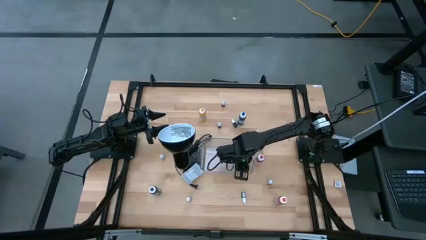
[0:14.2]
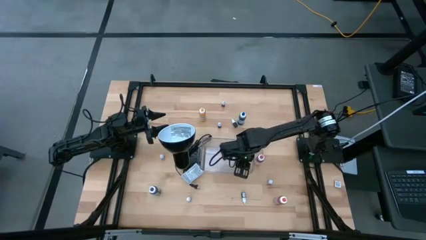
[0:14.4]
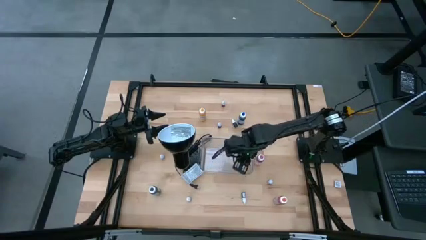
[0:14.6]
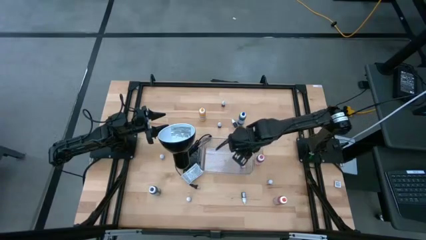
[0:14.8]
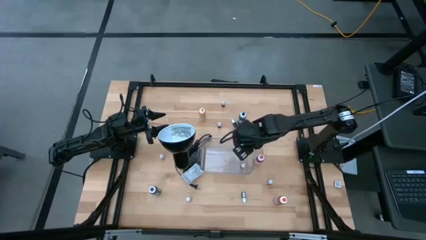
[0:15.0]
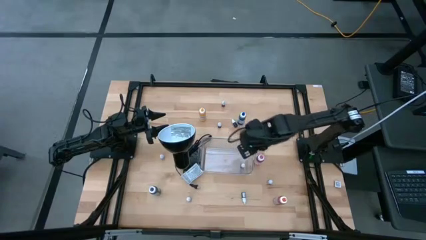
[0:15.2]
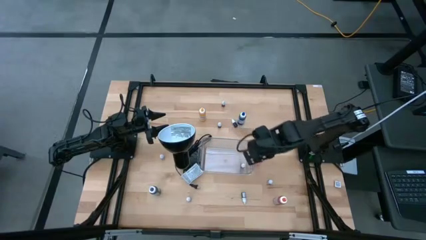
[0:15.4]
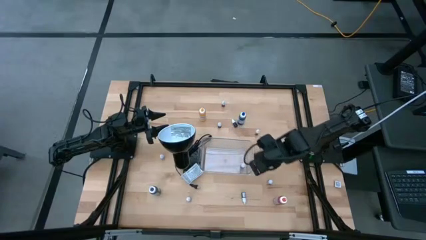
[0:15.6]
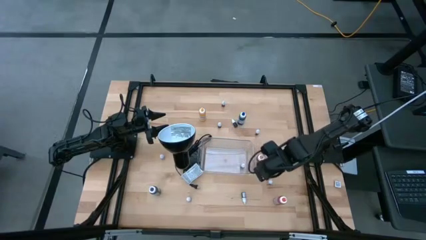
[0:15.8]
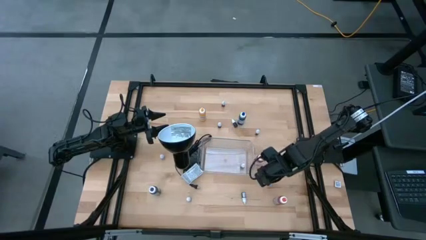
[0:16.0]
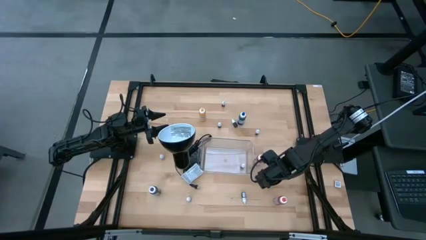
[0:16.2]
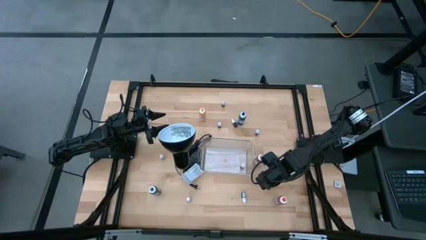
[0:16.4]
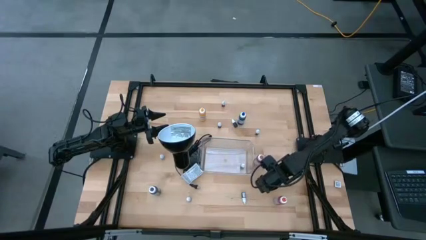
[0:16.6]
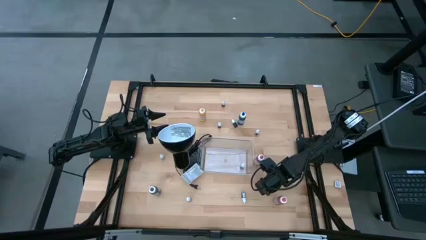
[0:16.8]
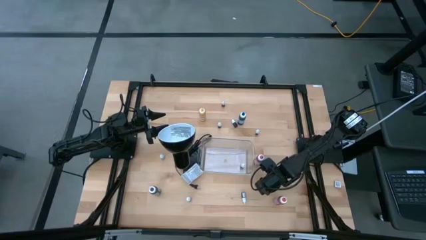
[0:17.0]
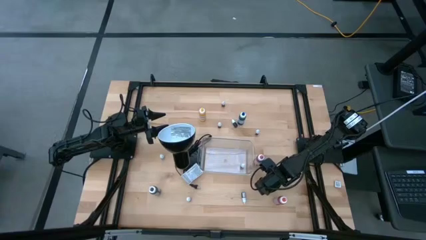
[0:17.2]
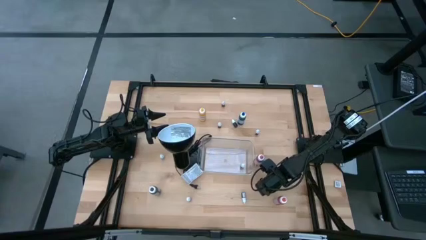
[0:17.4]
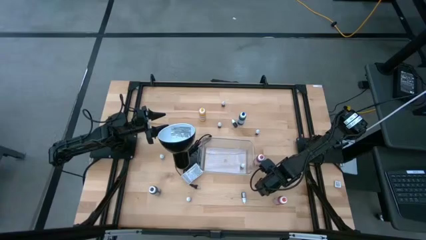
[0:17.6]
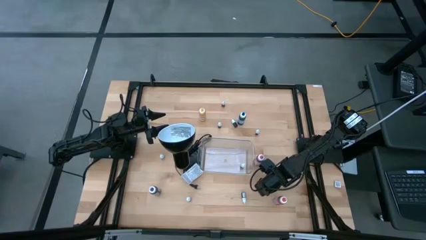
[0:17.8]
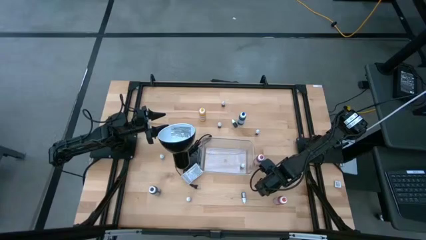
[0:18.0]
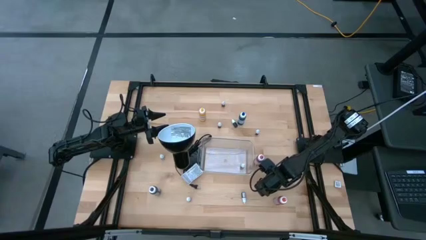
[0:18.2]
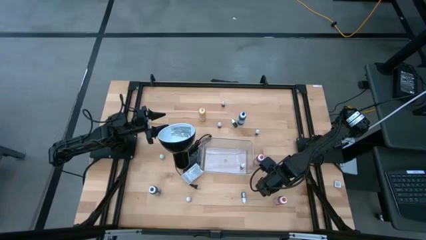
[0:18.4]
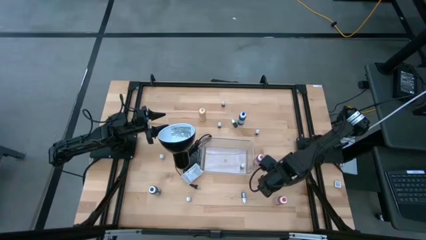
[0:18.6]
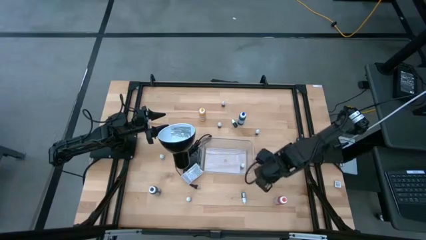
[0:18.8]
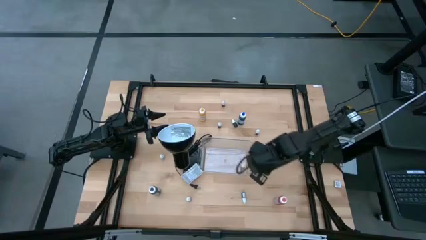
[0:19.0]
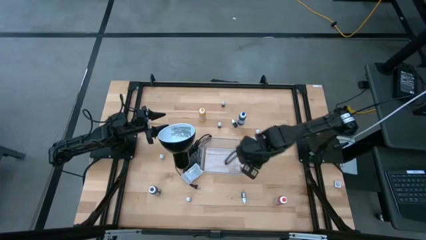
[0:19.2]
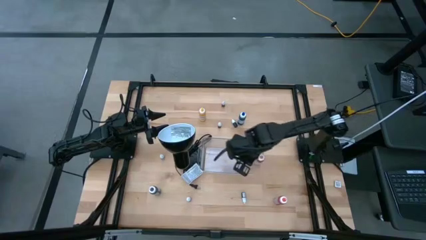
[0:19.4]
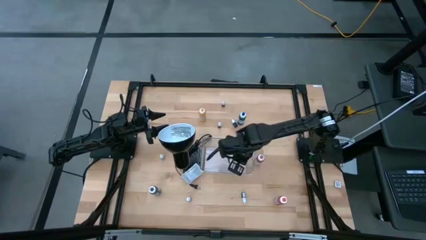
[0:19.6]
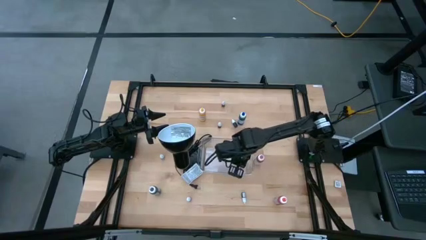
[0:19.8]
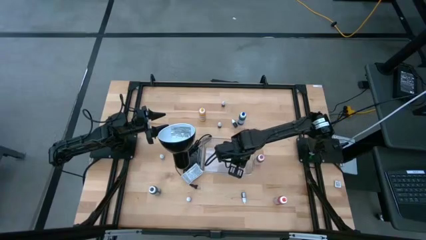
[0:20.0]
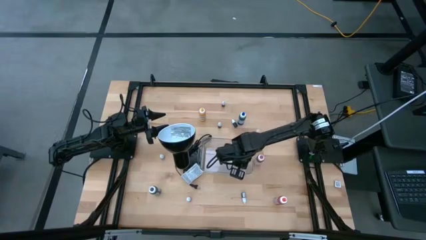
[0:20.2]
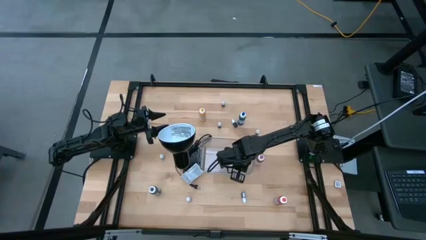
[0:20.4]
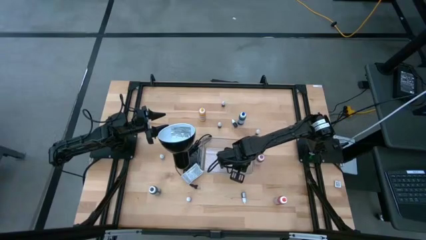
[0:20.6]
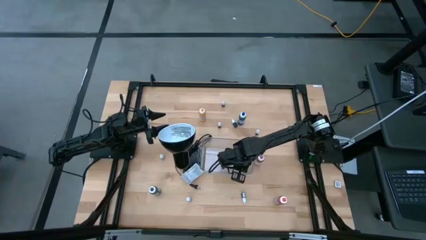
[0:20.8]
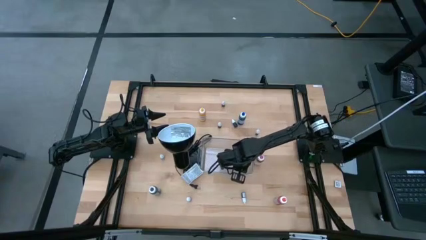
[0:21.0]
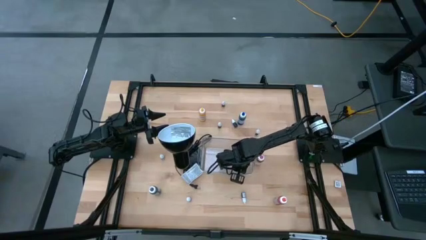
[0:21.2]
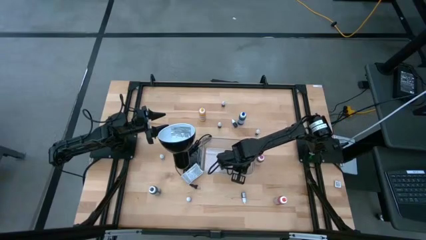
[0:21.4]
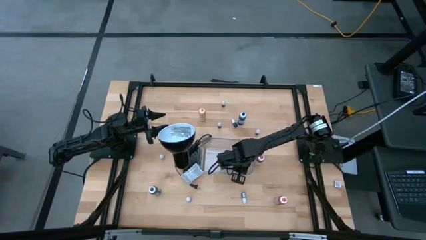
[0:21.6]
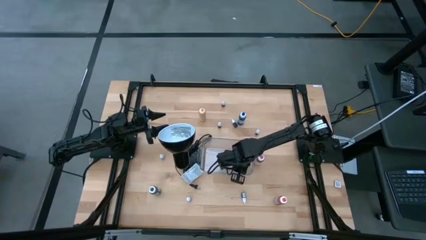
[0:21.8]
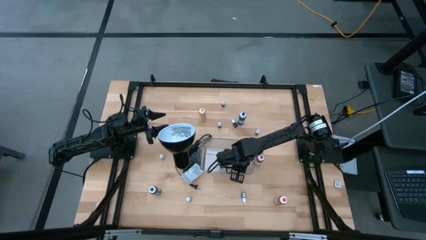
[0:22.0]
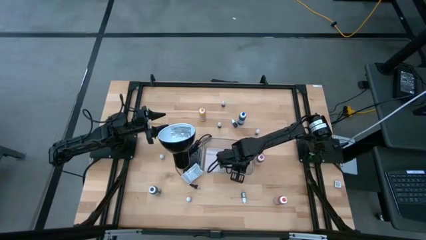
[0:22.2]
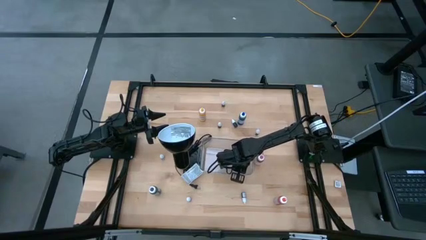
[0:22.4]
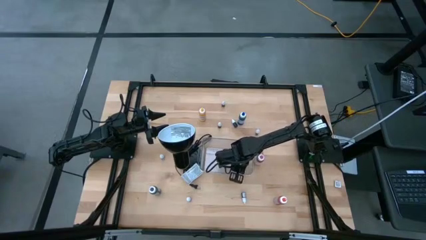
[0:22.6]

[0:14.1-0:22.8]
Task: Pick & Place food coloring
Put the small light blue food coloring bottle into the transparent bin

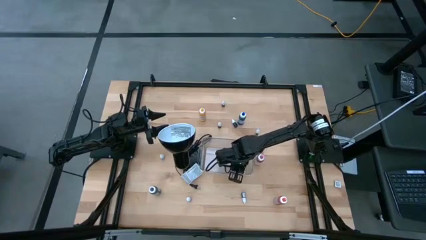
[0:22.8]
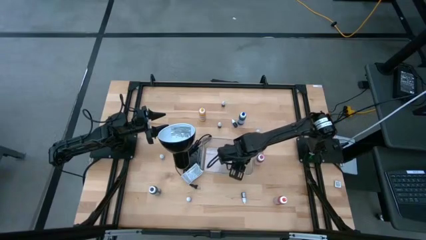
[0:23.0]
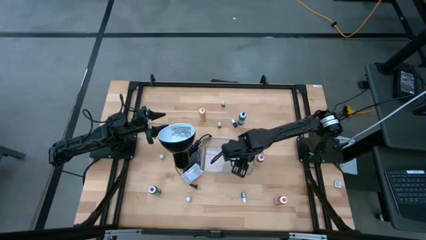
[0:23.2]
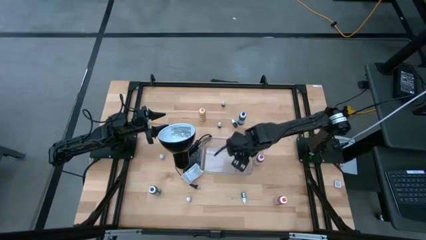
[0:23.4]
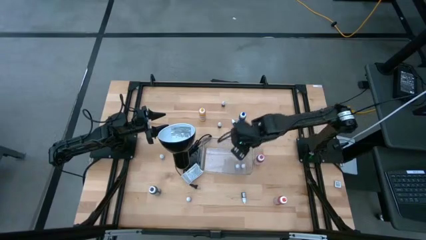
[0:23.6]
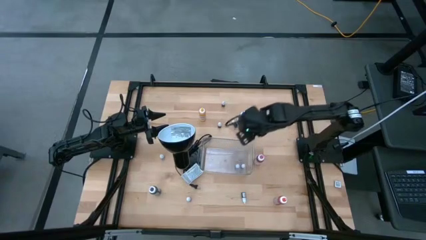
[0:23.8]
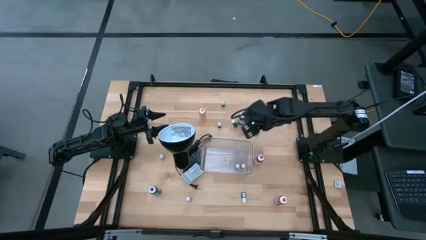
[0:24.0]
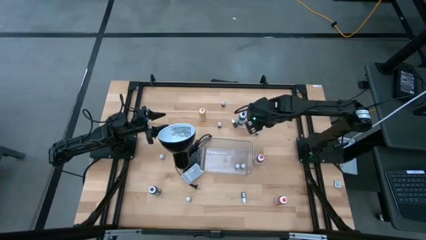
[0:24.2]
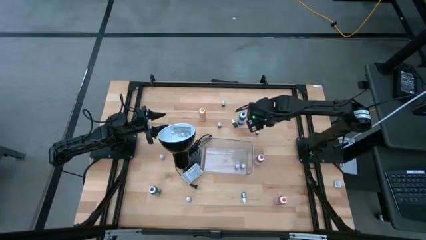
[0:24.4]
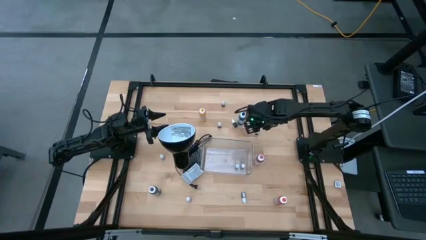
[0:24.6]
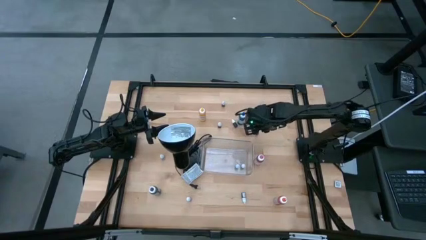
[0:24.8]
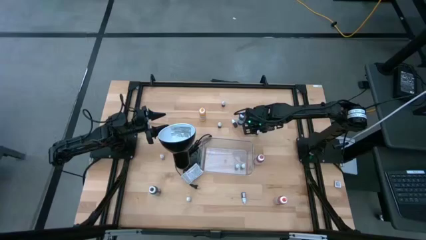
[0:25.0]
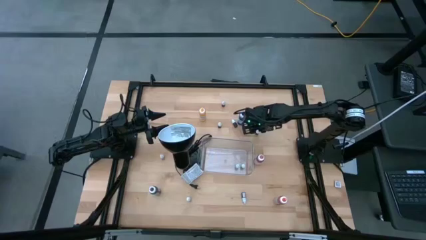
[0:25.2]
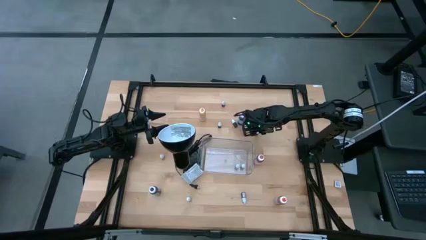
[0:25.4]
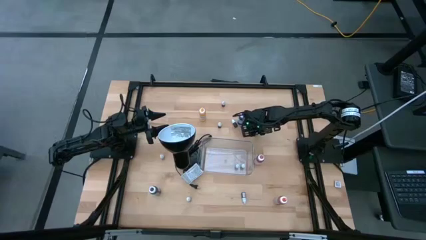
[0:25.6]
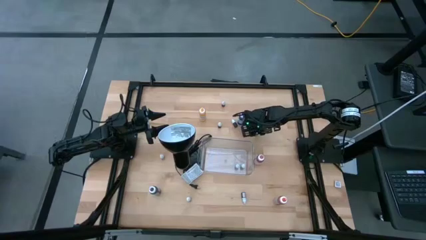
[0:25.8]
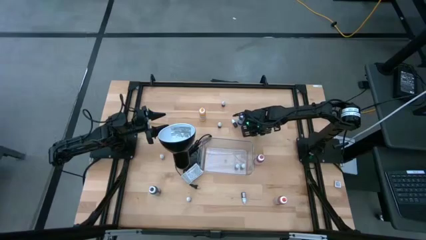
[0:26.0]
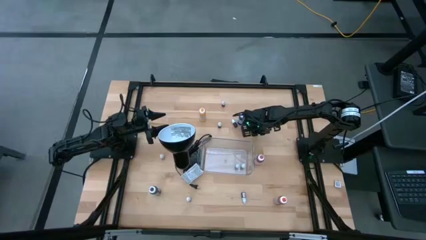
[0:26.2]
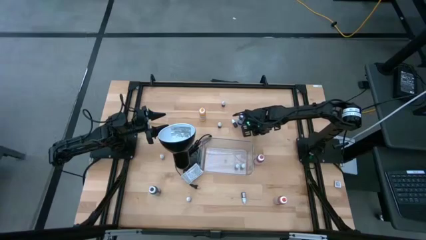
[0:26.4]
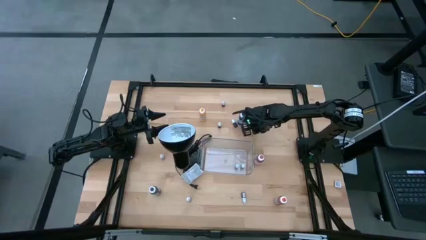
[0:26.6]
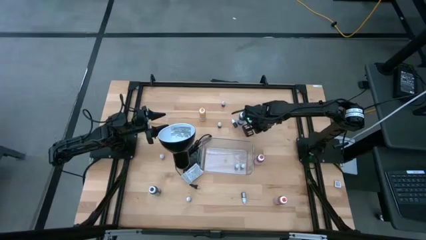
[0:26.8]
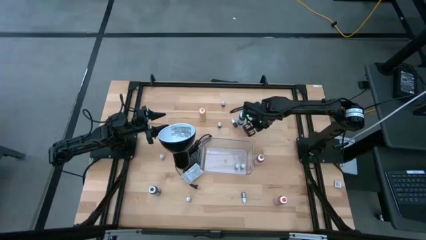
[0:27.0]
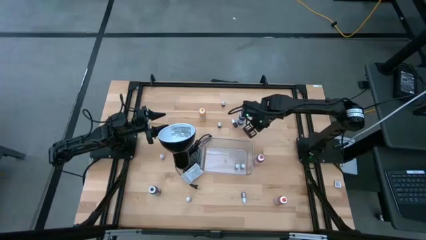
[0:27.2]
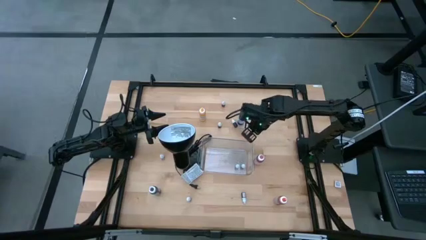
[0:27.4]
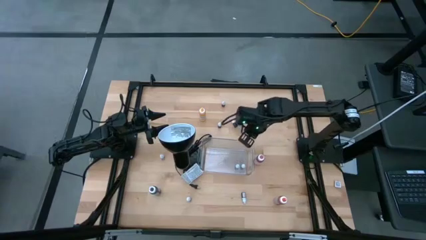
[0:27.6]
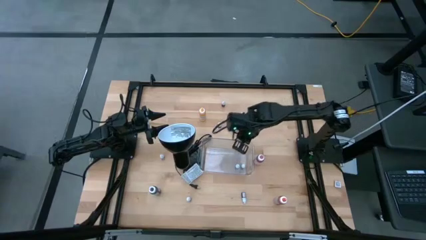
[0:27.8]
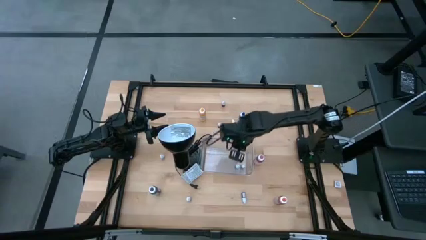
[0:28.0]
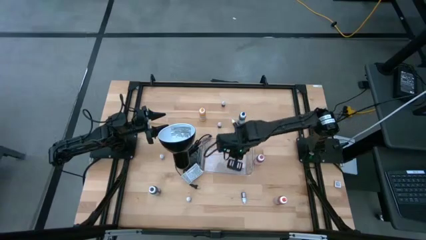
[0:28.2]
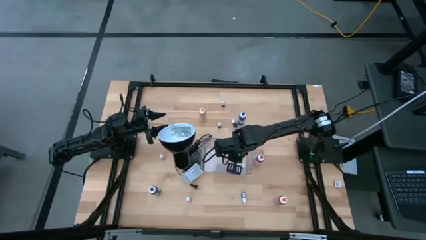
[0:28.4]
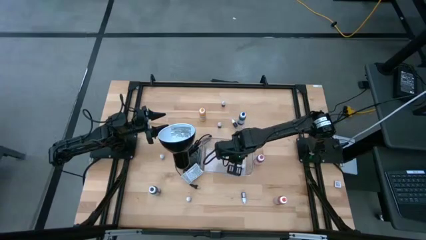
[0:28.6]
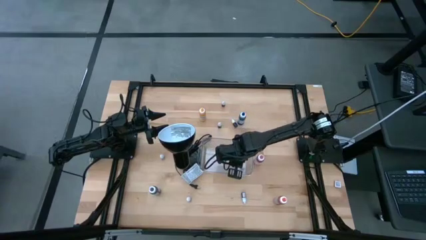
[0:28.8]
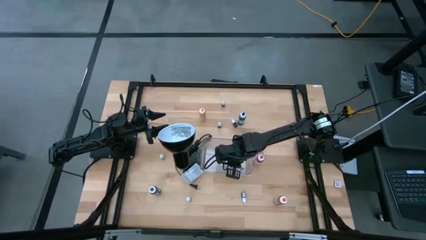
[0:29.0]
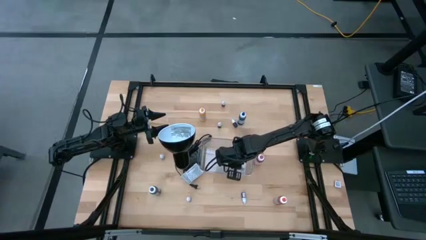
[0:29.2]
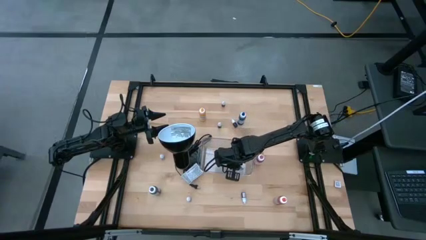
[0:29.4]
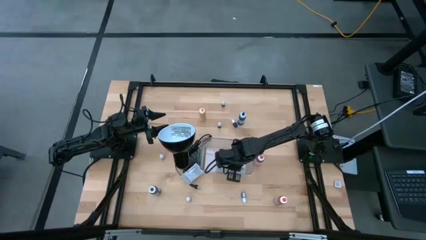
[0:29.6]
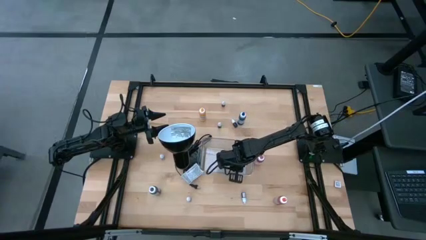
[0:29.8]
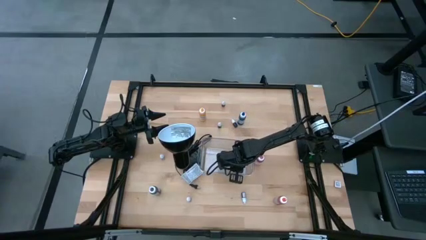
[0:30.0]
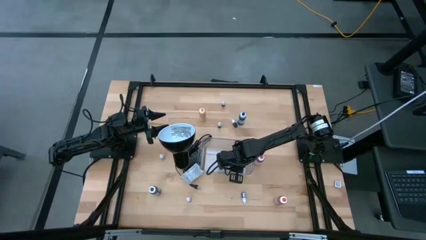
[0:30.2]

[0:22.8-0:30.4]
Put the small black food coloring bottle into the transparent bin
